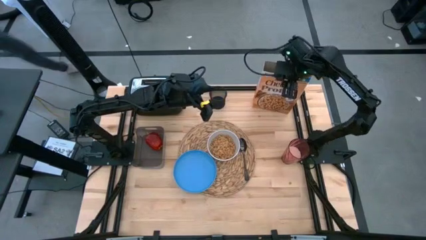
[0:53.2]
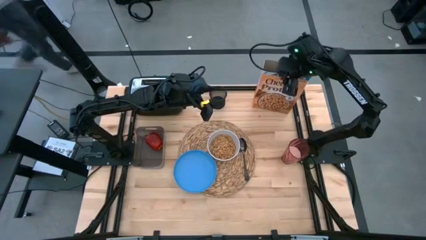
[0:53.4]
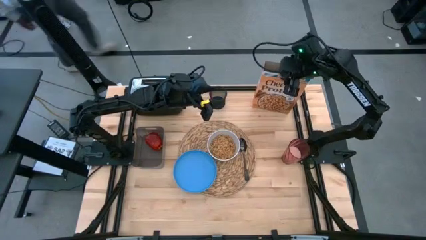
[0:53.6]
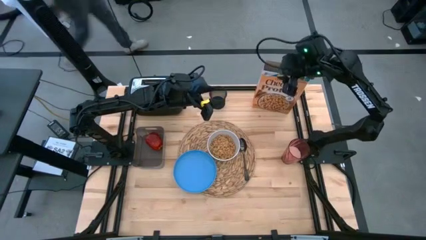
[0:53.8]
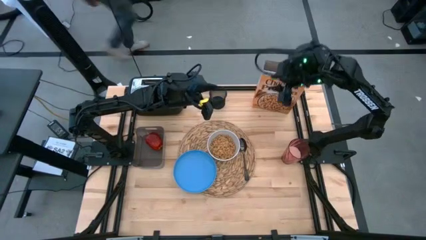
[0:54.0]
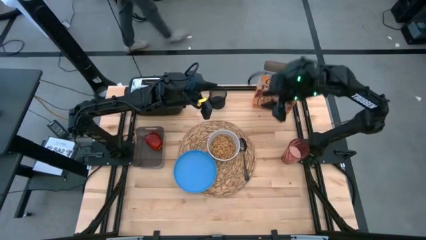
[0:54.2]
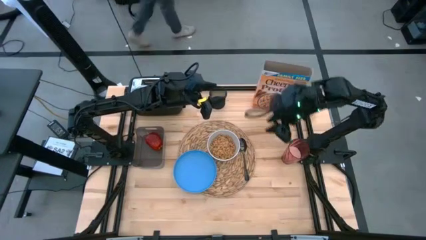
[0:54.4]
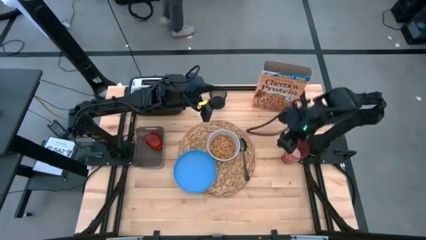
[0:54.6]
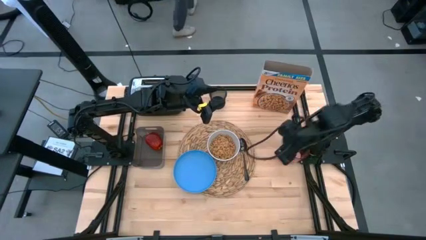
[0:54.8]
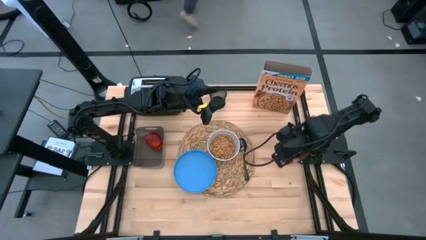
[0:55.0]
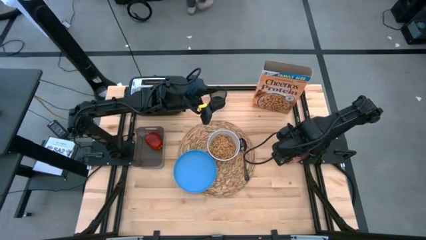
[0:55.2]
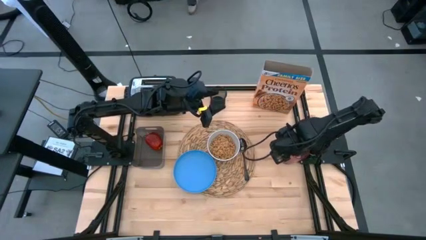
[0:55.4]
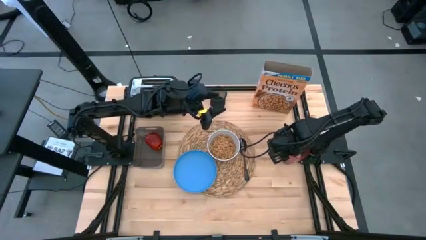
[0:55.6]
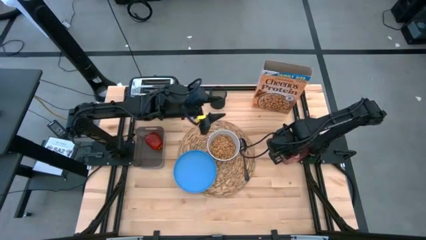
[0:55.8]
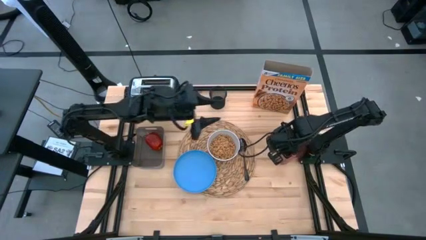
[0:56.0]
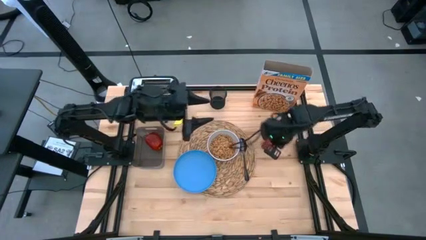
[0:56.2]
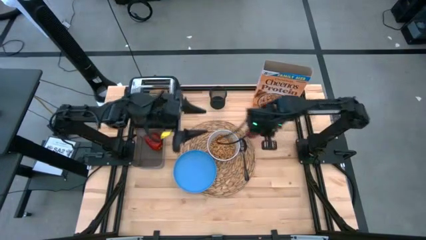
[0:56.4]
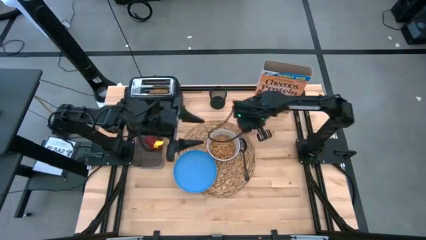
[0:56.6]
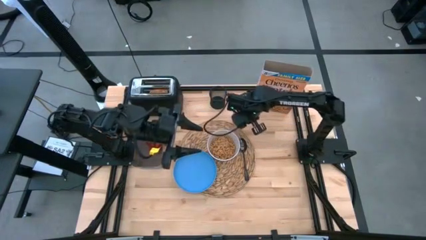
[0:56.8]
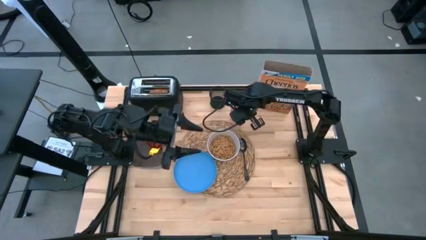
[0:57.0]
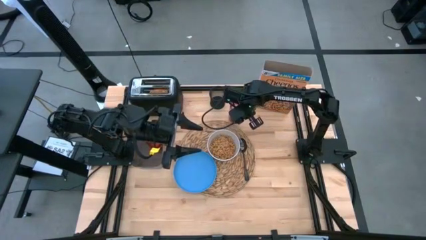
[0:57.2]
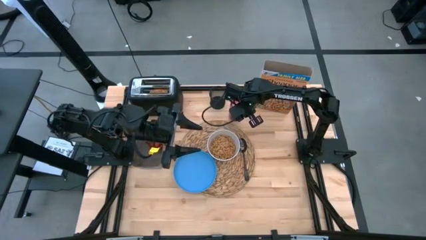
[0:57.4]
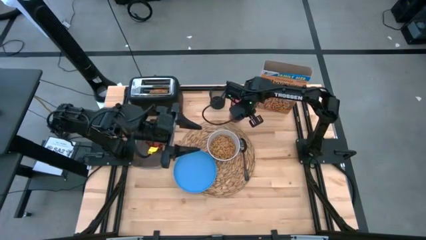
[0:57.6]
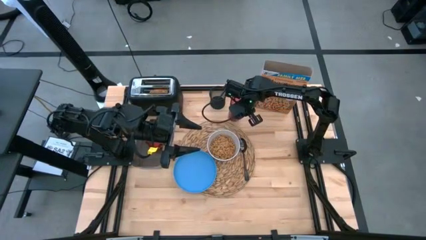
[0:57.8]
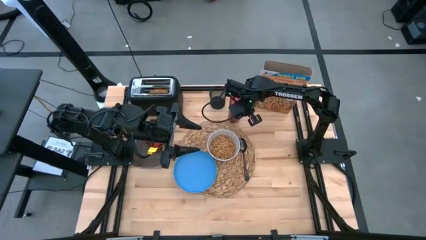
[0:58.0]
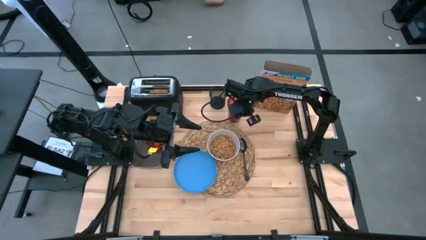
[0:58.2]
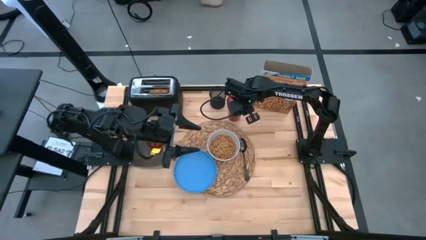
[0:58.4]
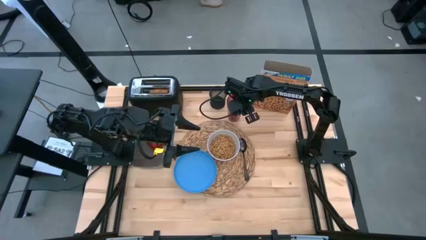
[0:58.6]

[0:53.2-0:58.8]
Task: Arrange a breakfast setting
Move the red cup to the top right of the table

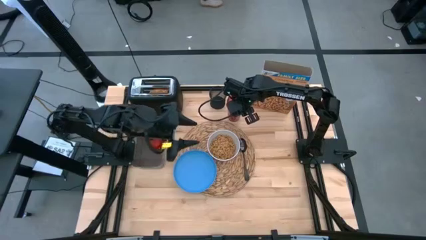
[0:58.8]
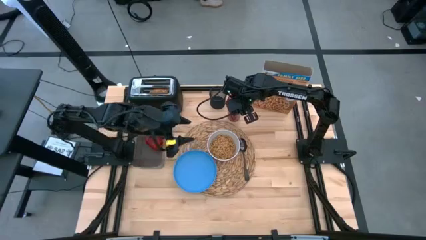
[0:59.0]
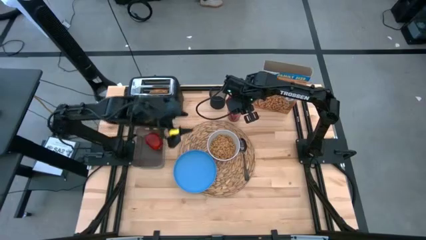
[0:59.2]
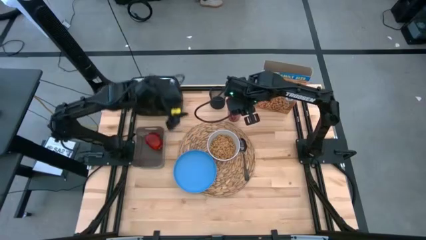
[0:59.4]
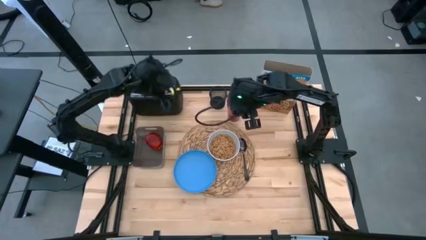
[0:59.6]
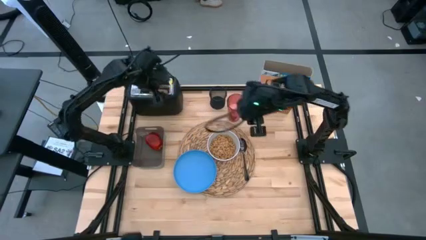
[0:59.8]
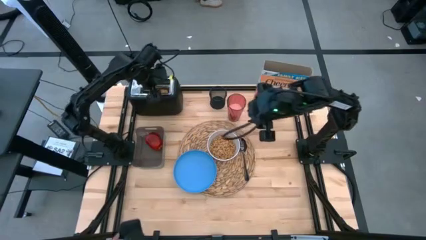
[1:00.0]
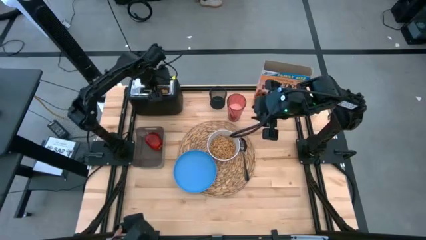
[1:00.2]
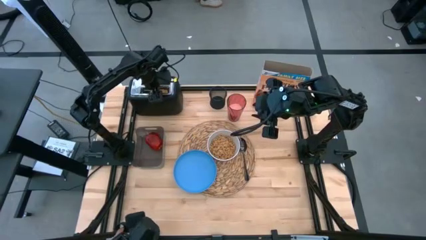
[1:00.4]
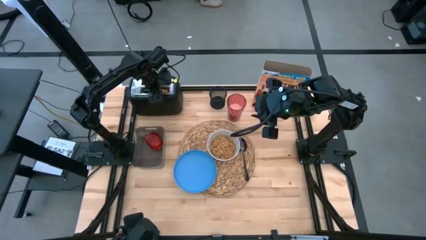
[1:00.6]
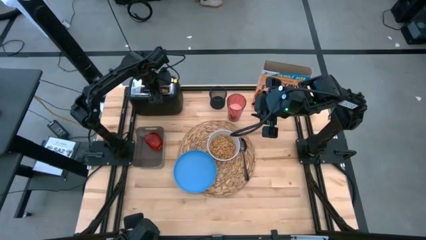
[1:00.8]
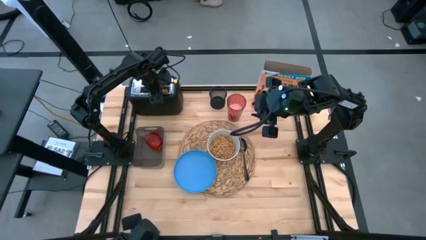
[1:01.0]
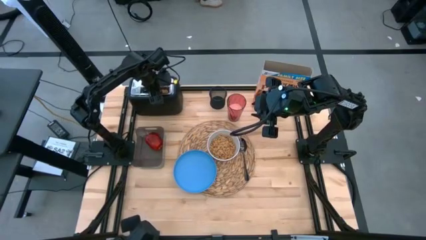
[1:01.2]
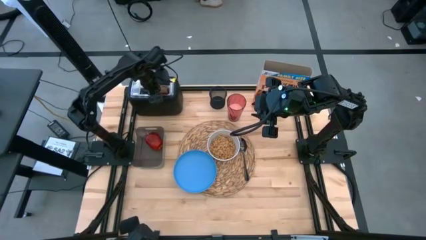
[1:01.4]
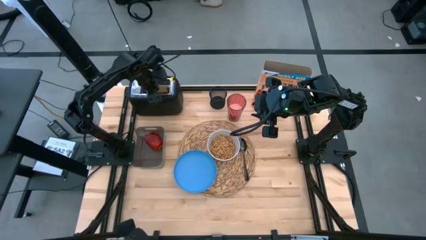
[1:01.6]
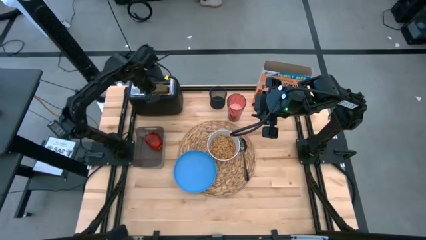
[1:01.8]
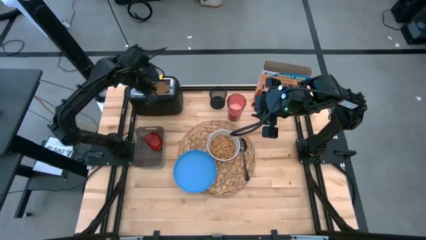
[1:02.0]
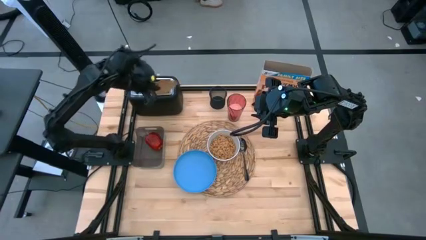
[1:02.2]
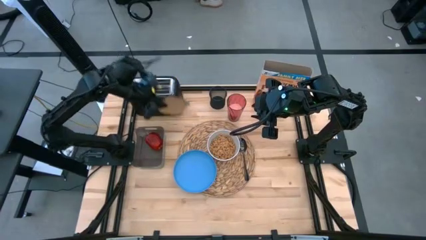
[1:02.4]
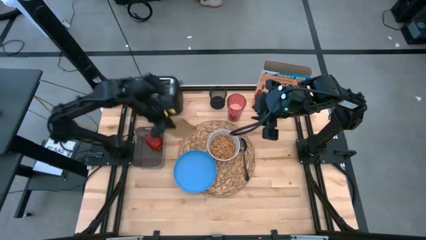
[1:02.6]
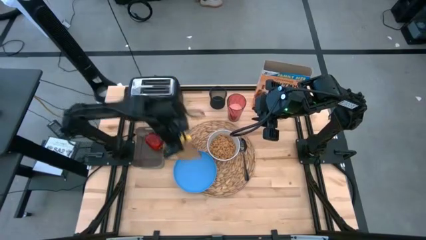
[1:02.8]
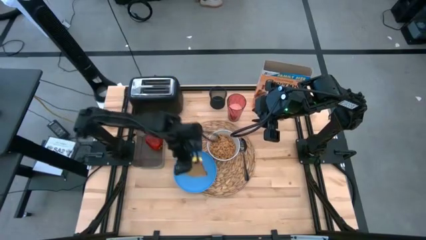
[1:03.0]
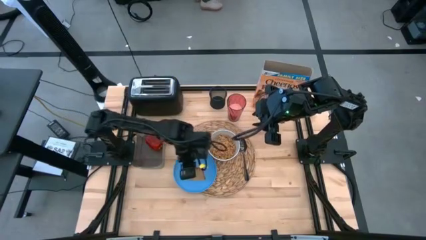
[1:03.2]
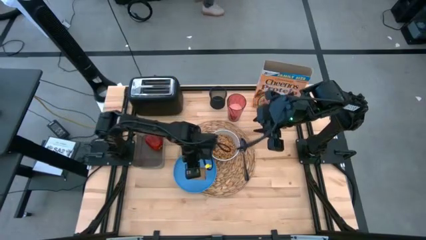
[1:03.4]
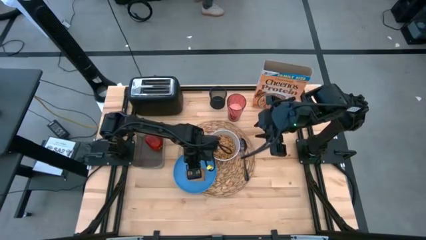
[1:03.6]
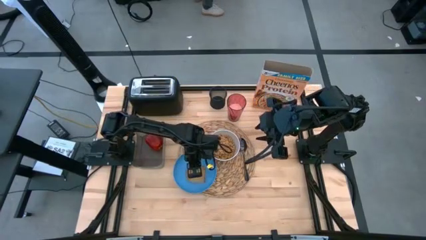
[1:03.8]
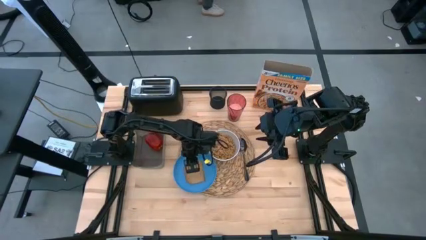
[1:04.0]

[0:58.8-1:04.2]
Put the brown toasted bread on the blue plate

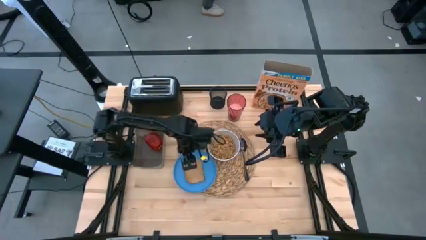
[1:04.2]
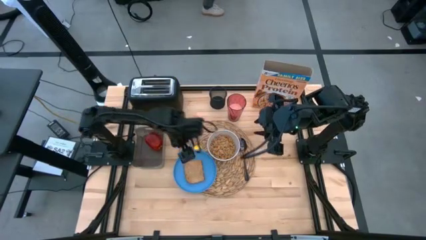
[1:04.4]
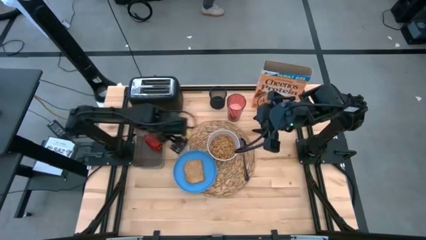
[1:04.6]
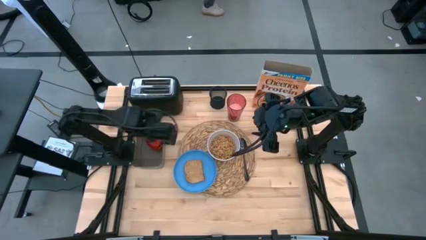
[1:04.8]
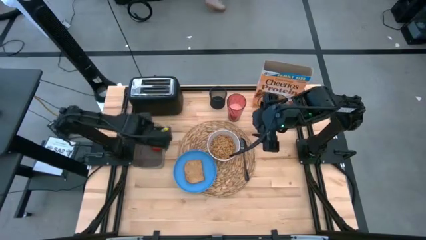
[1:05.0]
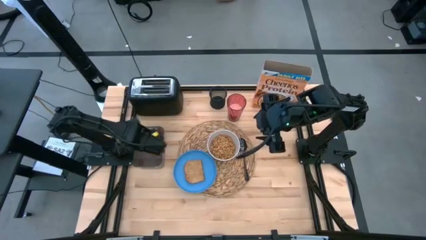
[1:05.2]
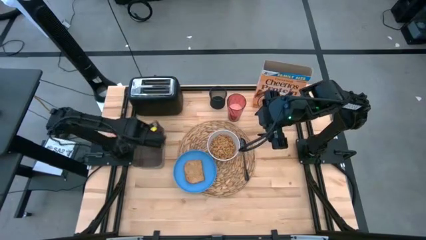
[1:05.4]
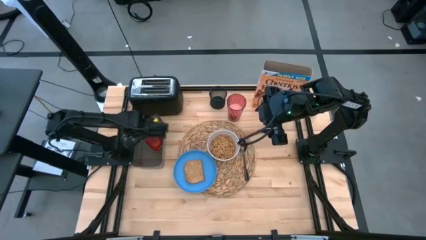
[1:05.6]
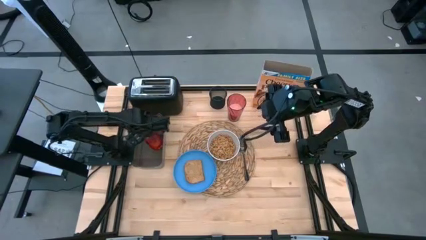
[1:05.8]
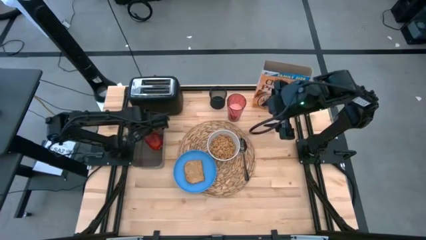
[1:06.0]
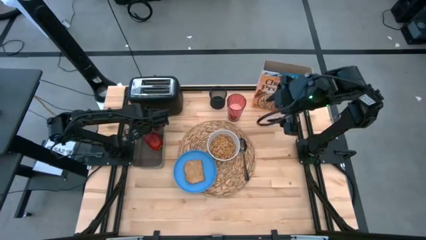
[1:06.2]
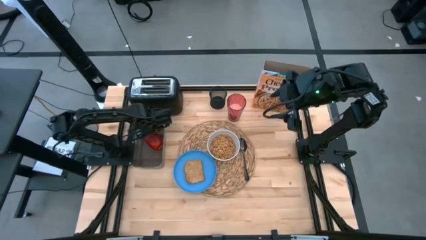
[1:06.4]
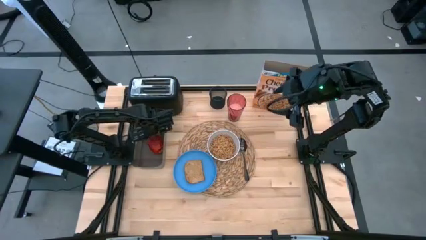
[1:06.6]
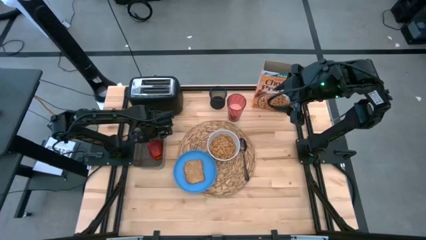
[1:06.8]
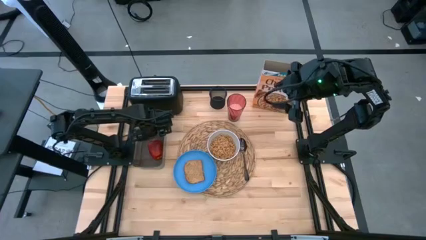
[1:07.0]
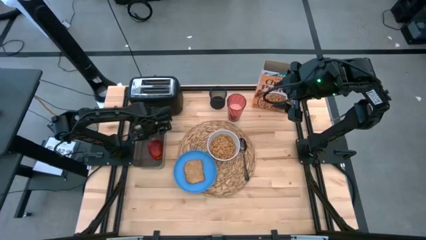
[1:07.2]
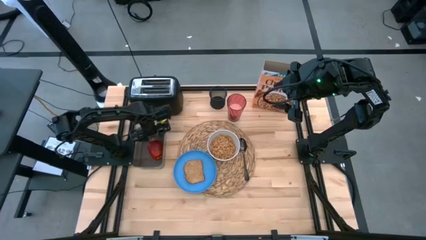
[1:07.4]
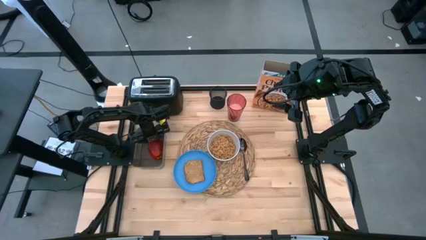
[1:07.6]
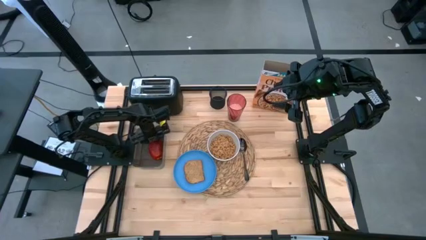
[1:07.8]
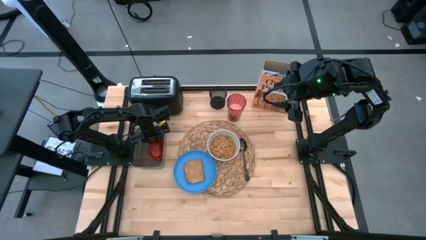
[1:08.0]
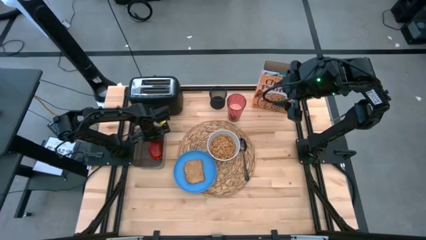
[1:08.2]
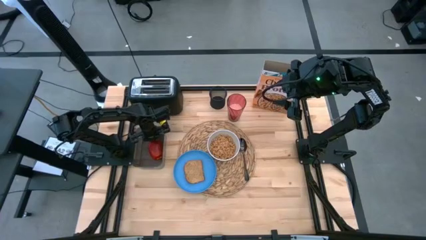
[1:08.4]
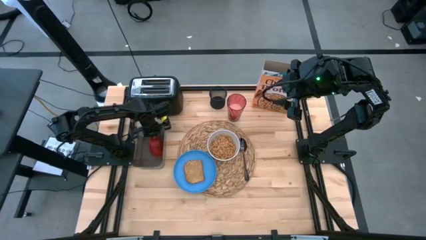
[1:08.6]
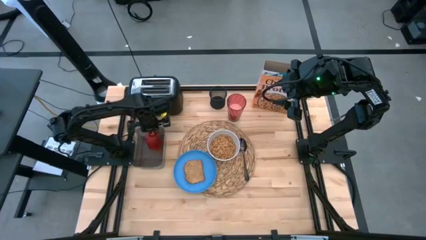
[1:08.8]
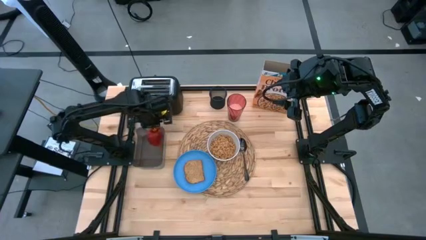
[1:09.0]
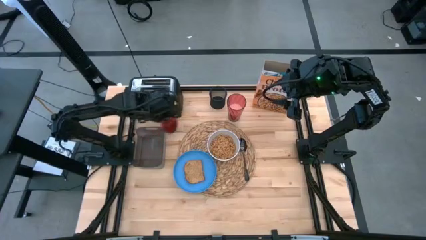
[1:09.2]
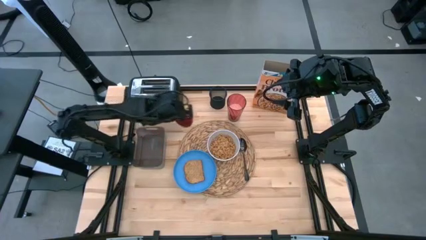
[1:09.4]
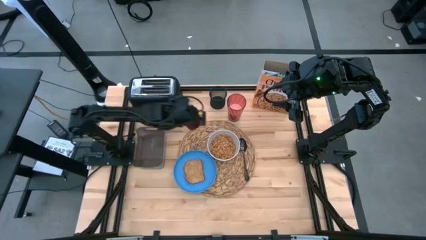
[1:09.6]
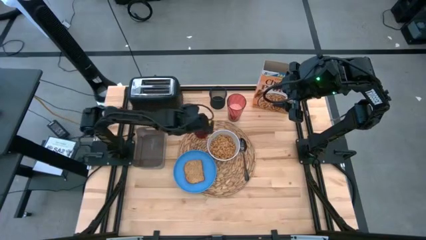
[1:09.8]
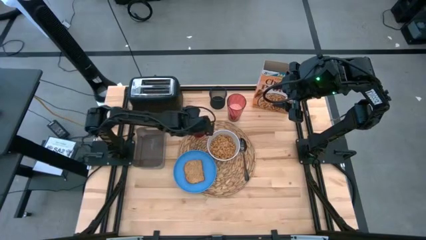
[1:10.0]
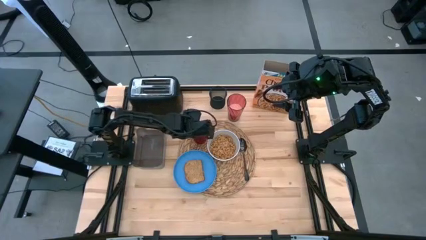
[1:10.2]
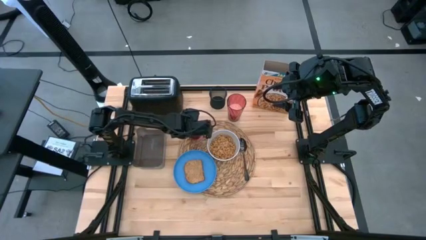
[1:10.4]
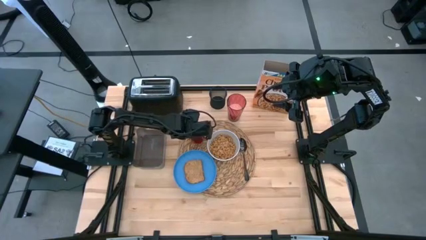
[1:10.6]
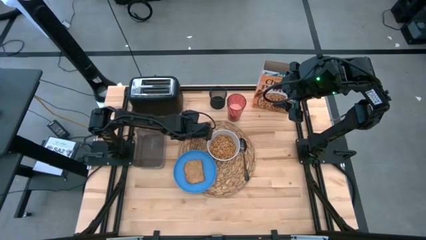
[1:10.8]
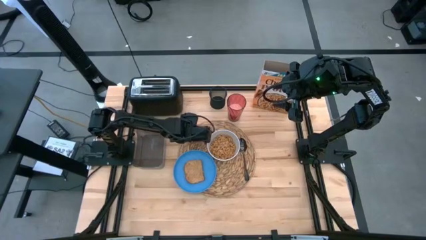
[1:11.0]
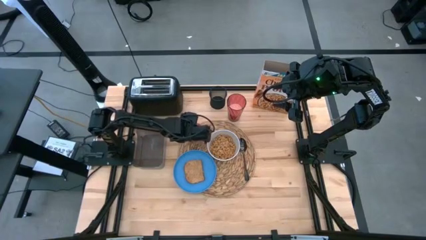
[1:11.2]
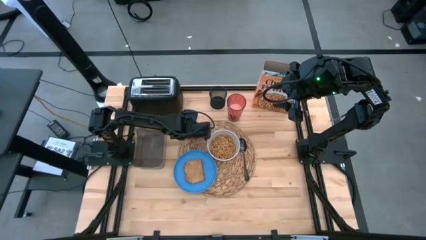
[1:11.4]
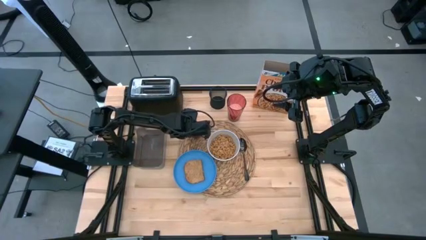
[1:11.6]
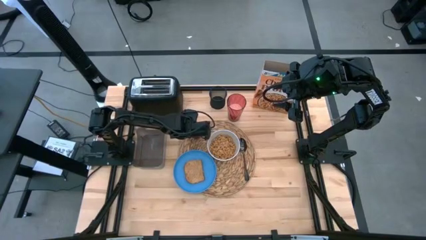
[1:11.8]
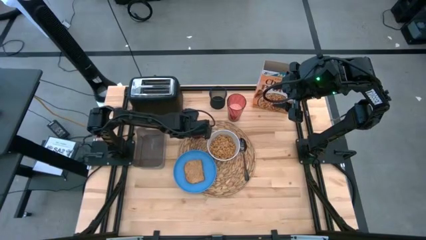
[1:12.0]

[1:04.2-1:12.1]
Put the red apple on the brown woven mat
